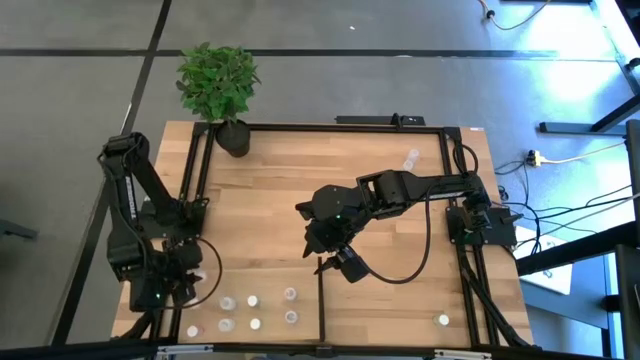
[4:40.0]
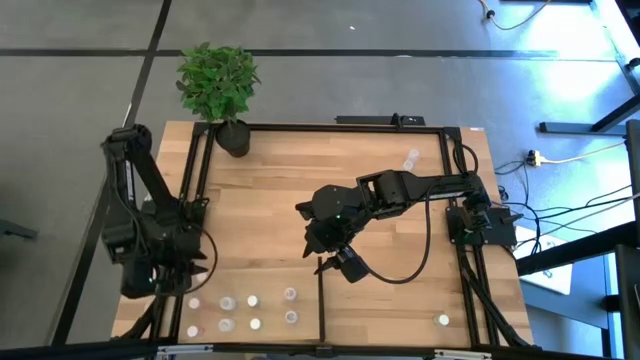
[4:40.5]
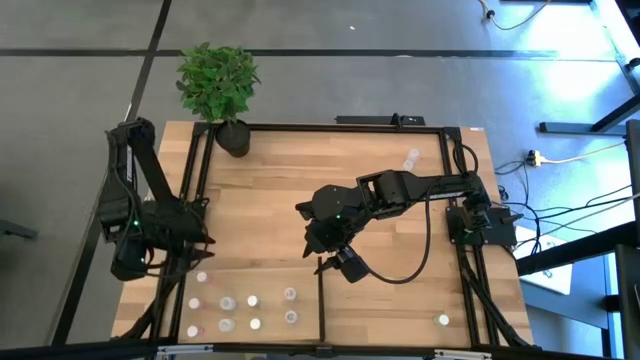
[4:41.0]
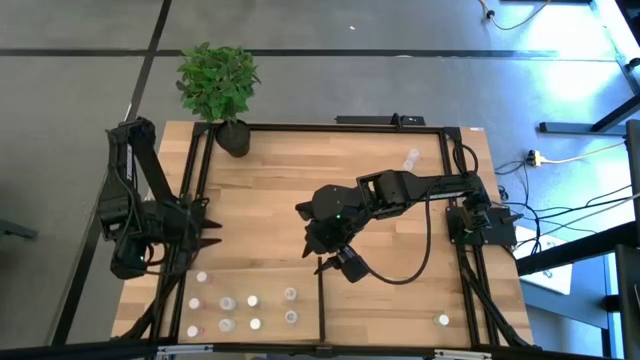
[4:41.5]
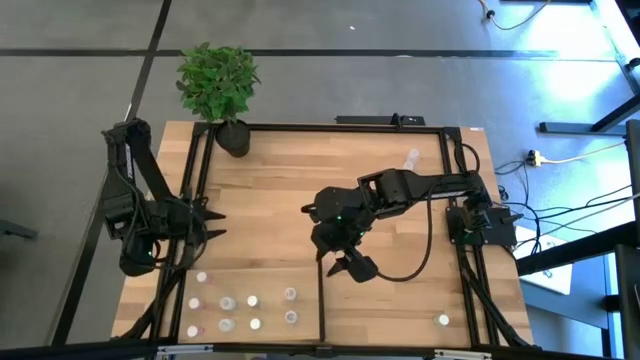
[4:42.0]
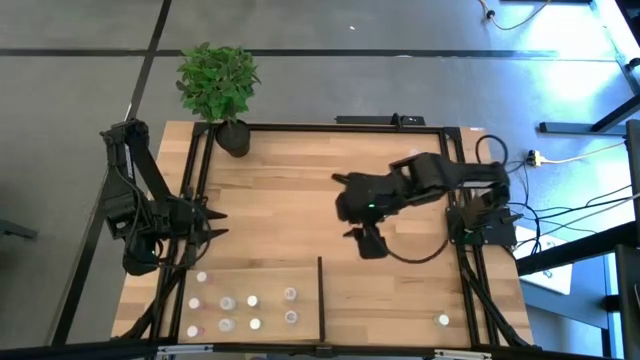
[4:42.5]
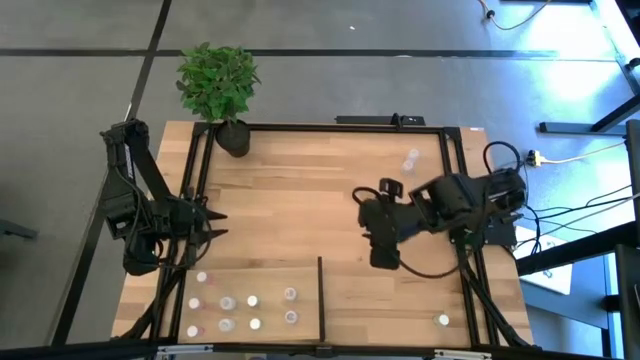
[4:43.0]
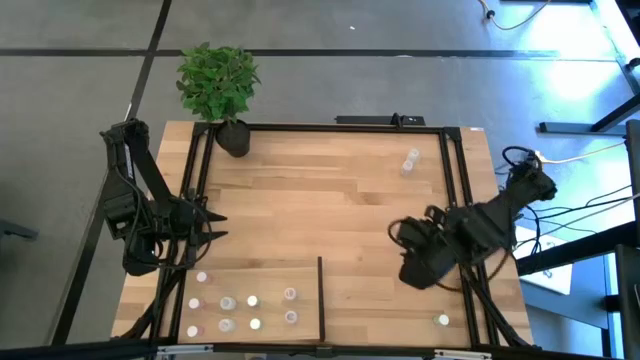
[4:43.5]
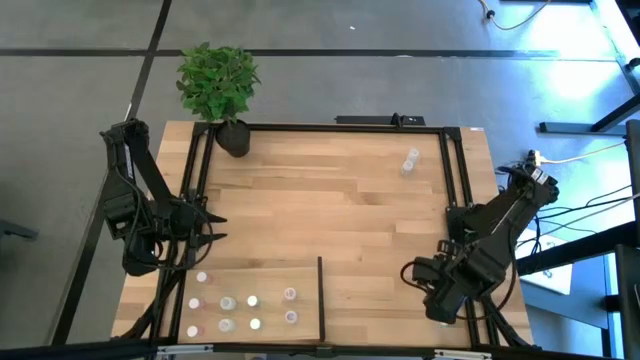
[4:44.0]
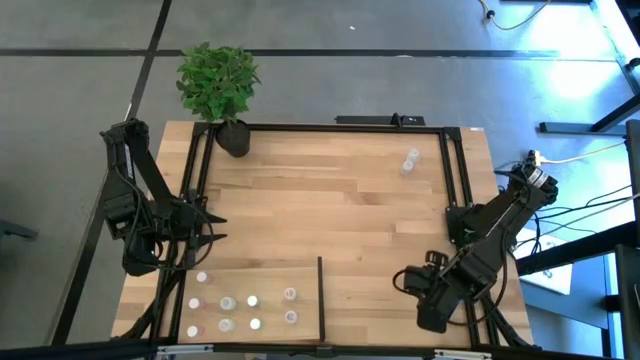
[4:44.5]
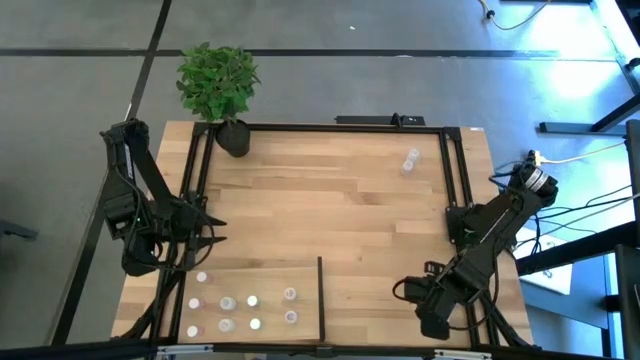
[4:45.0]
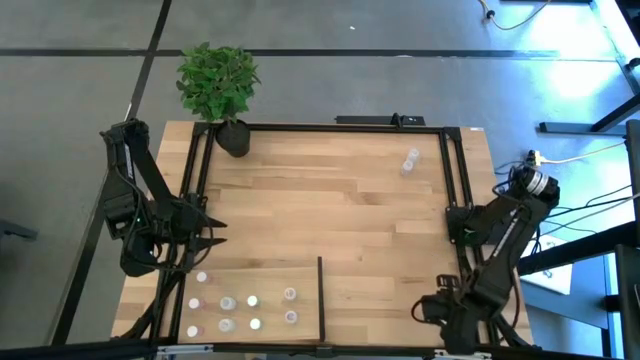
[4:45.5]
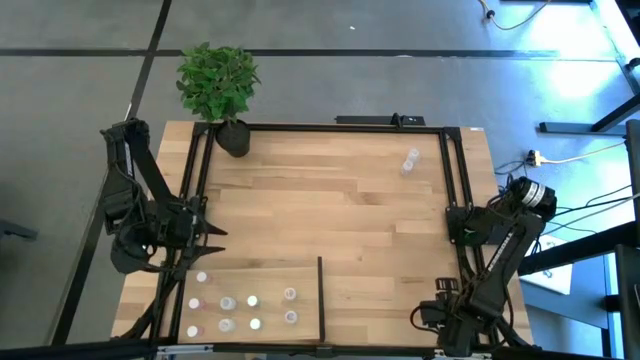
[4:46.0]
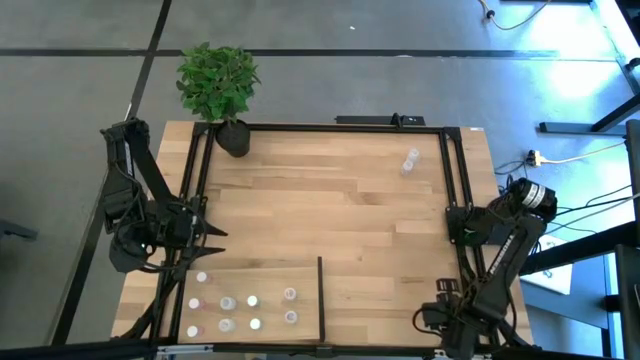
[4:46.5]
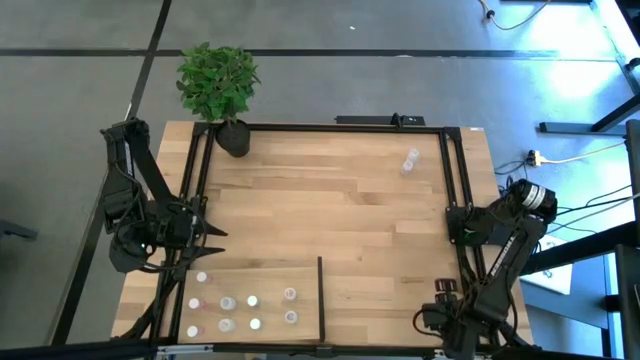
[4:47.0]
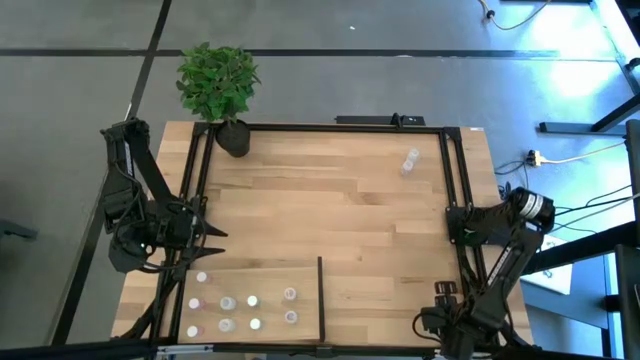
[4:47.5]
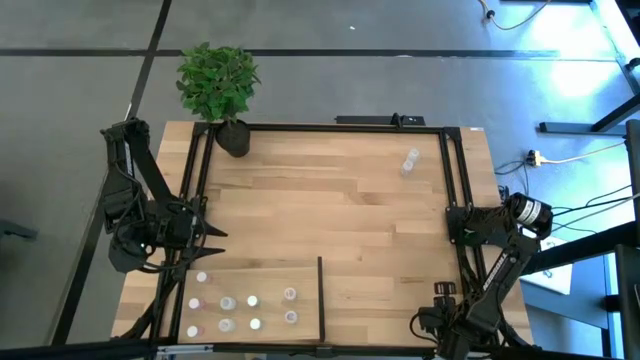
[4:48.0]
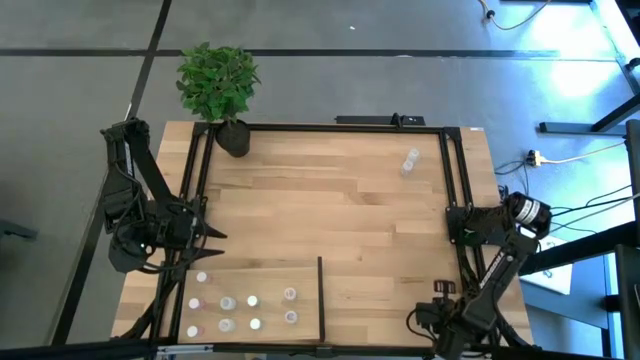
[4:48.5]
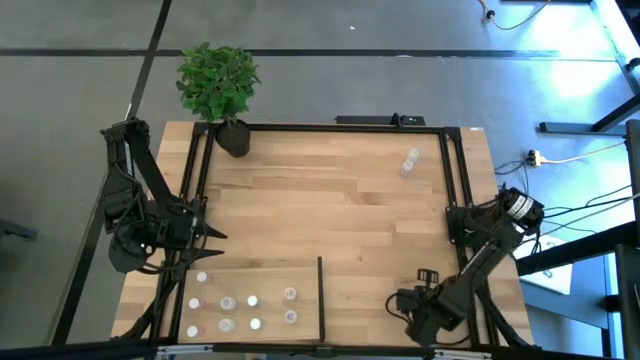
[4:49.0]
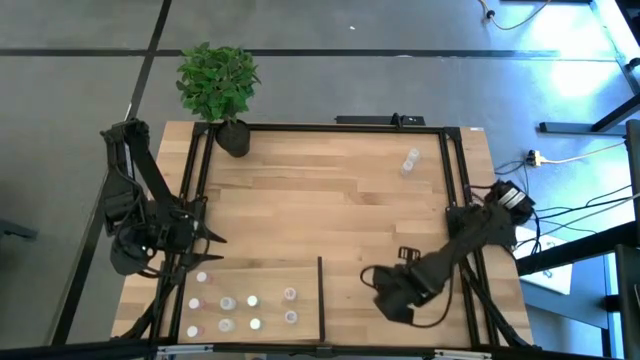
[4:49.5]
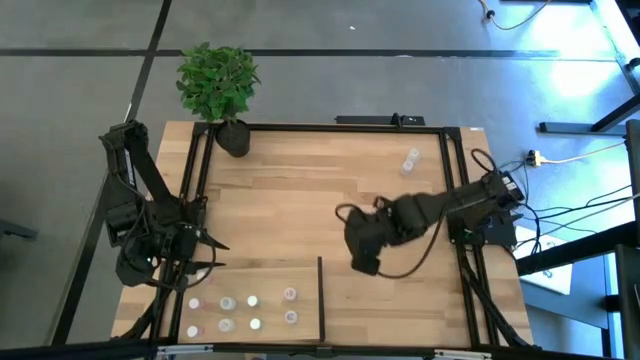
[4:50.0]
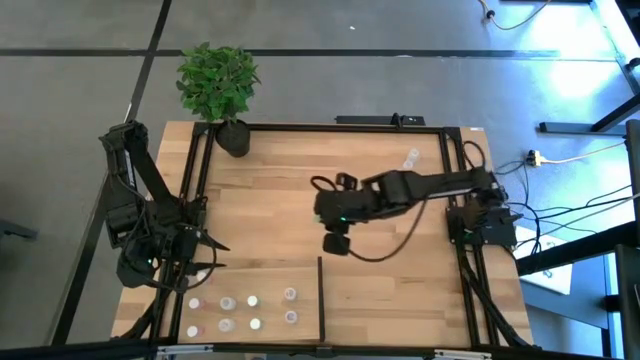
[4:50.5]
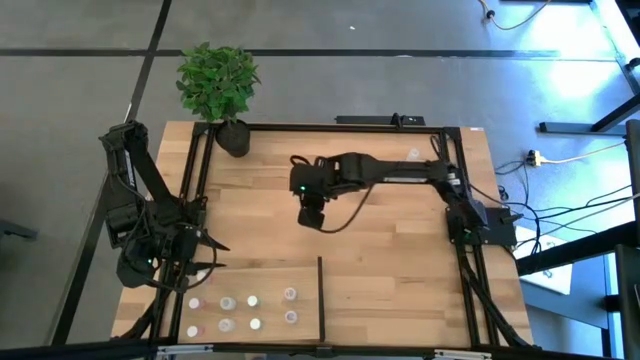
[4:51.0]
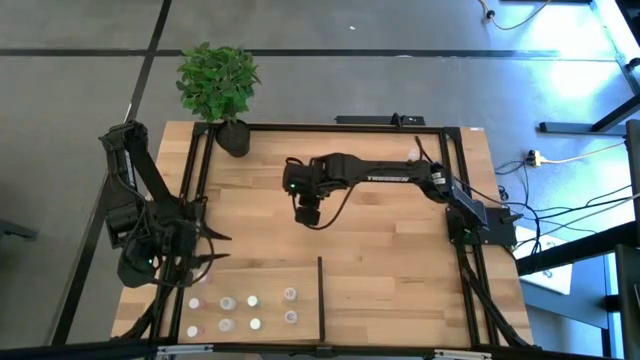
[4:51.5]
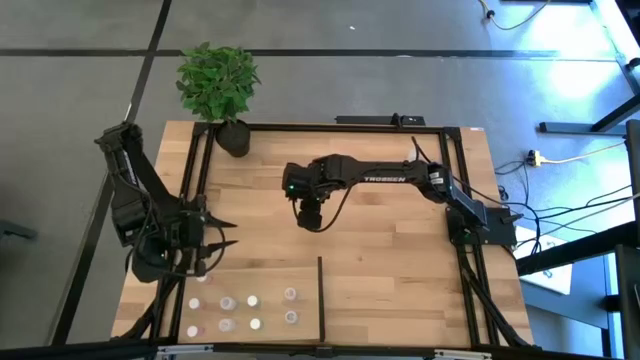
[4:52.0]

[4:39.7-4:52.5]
Task: Pick and place medicine bottles onto shelf by color
Put the green pill bottle on the shelf aligned with the other green pill bottles

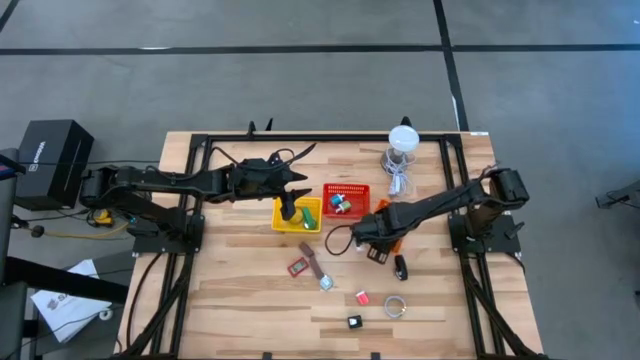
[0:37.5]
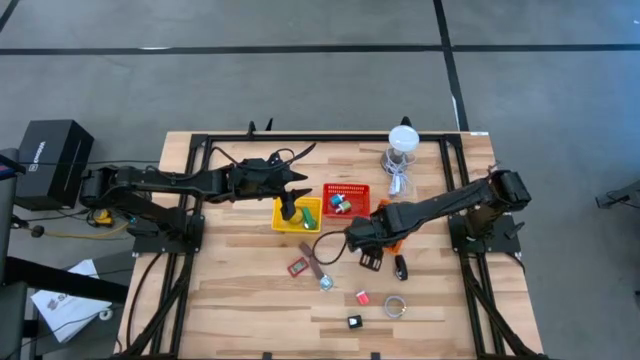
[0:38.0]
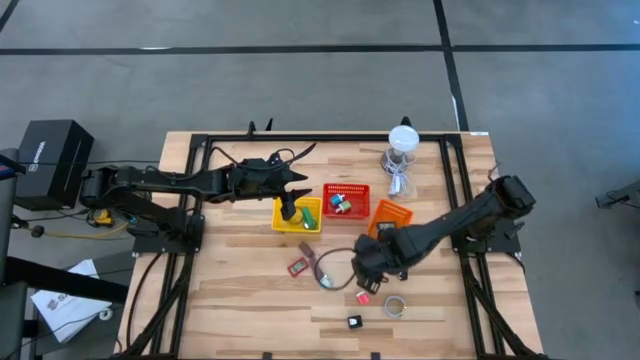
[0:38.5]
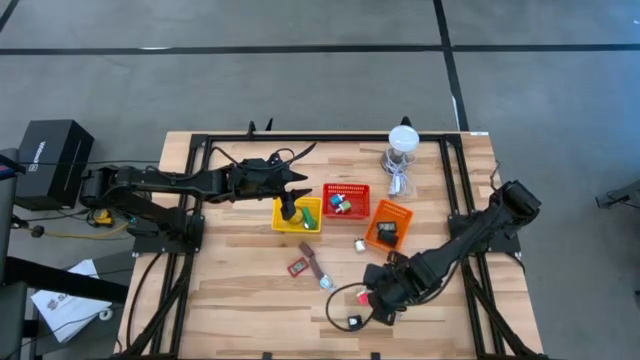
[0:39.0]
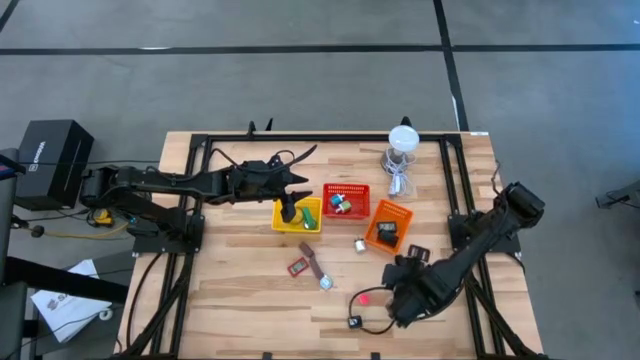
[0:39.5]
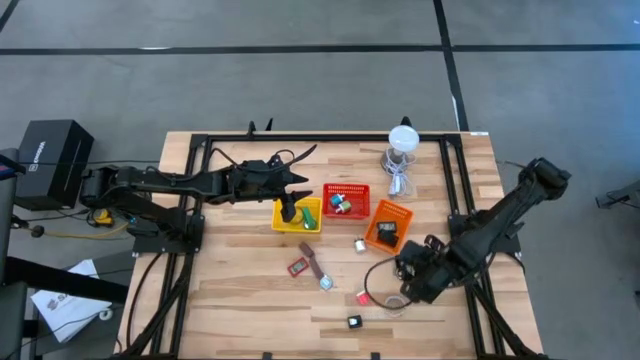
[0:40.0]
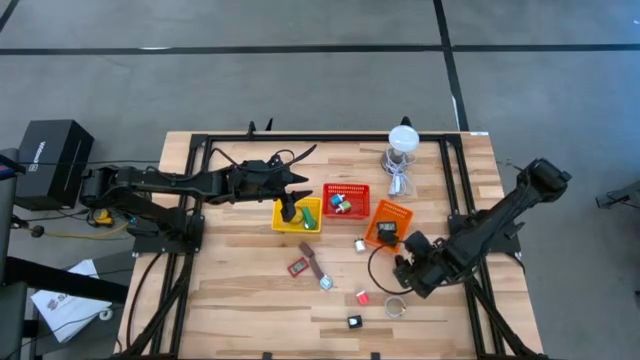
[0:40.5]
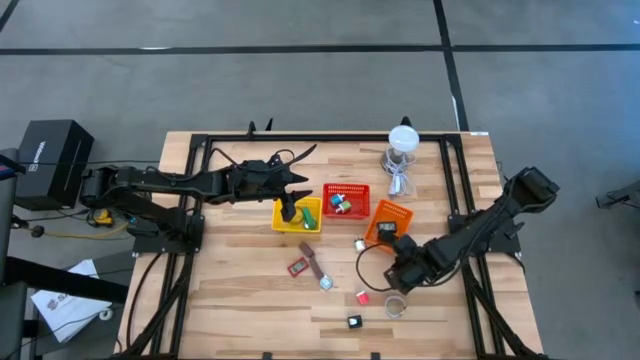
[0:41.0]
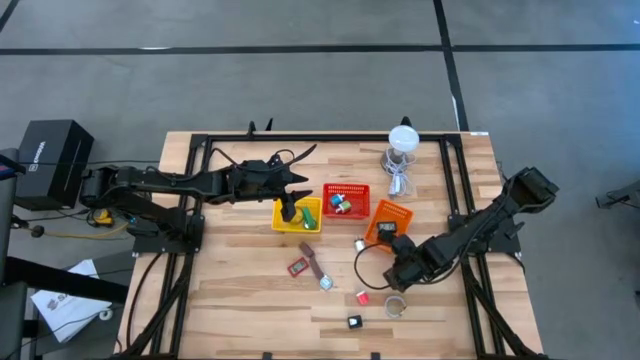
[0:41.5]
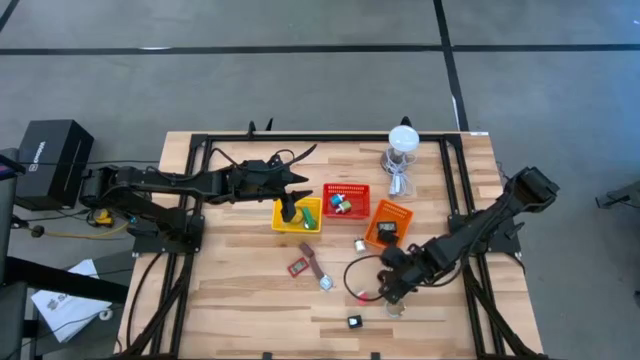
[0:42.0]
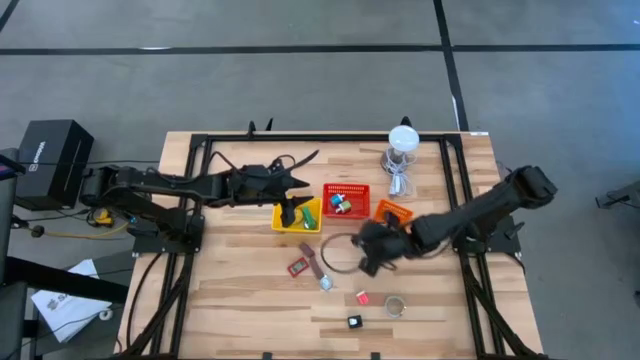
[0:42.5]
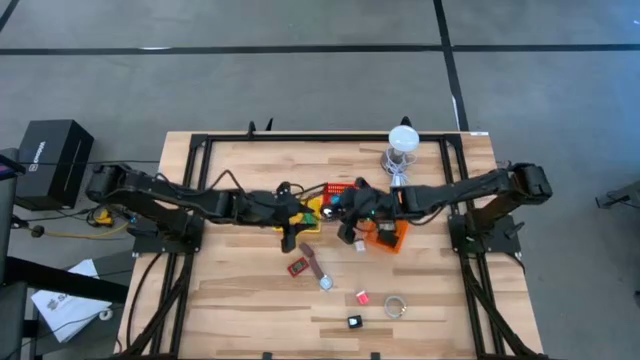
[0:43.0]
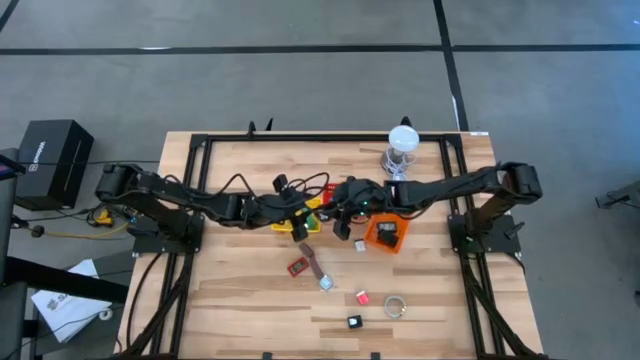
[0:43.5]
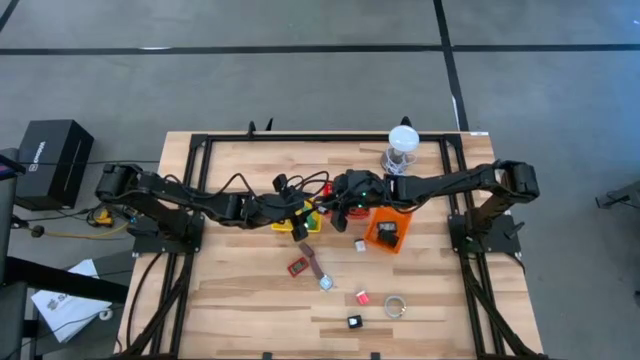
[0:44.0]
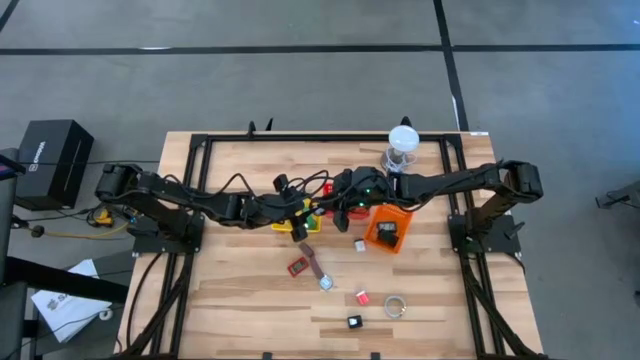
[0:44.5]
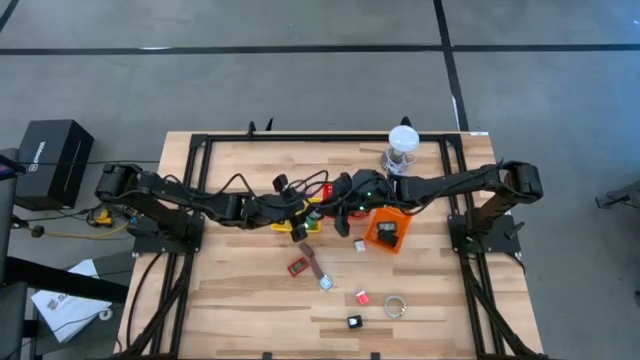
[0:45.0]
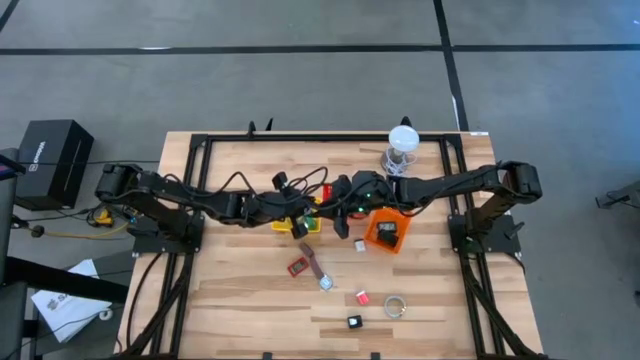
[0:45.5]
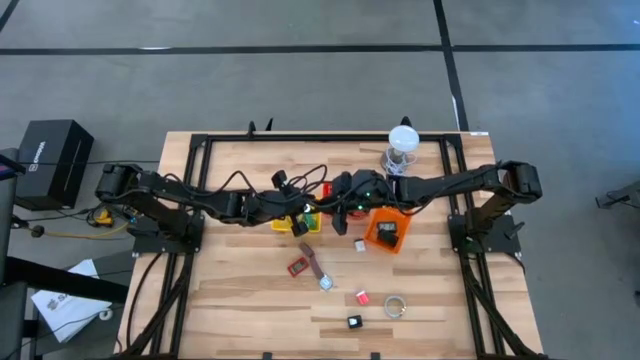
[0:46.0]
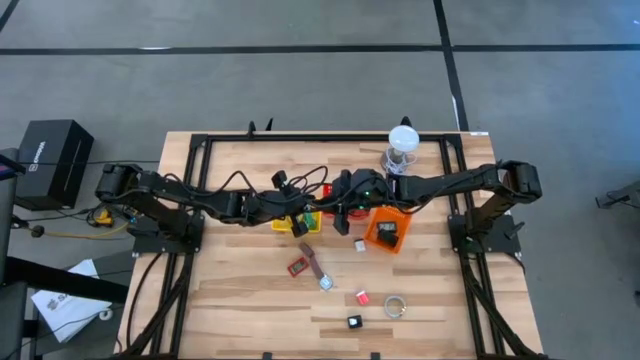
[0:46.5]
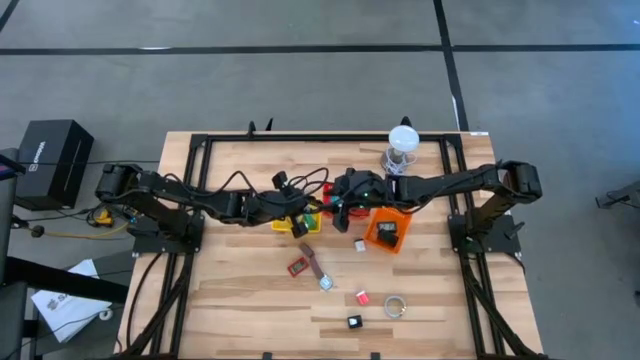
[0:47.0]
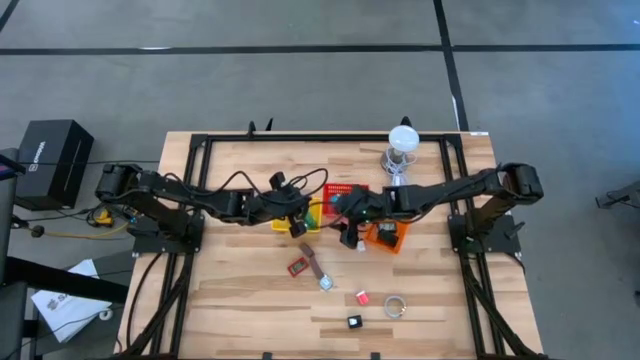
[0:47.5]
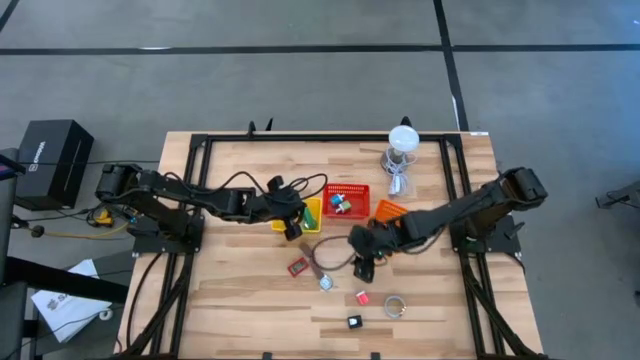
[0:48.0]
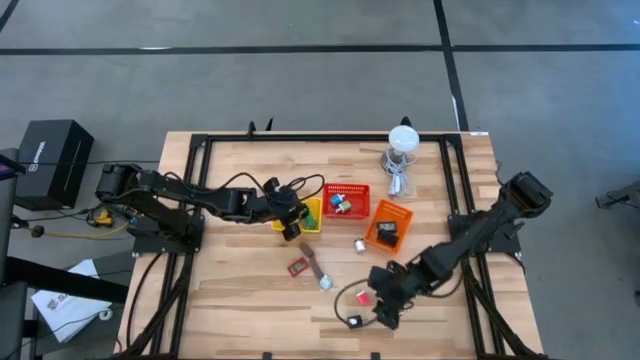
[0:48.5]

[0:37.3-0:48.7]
Task: Pick & Place Office items
Put the black watch into the yellow bin
